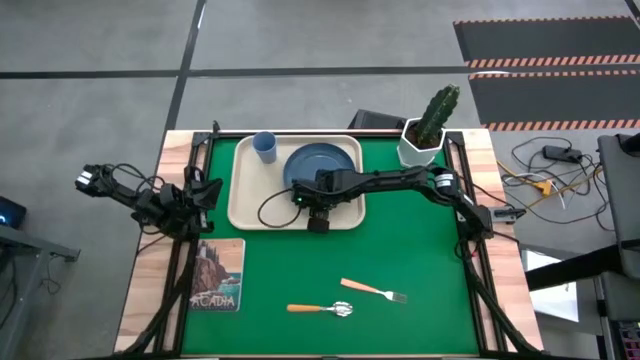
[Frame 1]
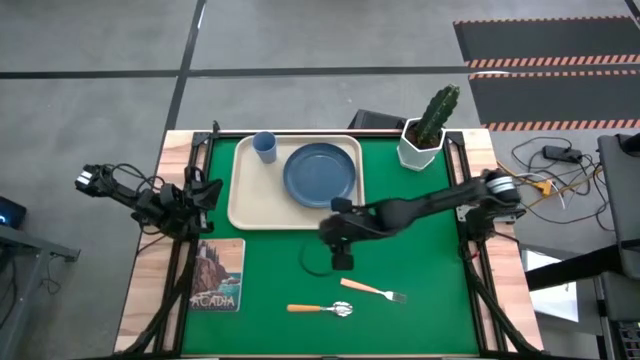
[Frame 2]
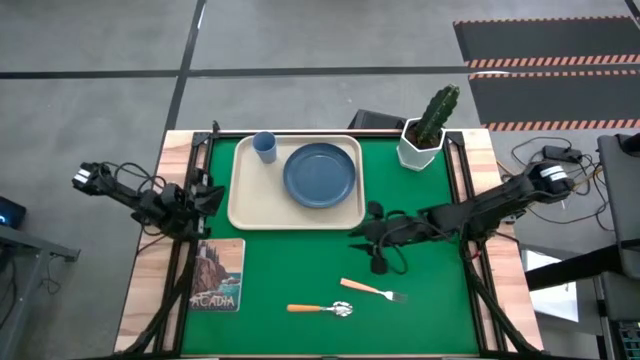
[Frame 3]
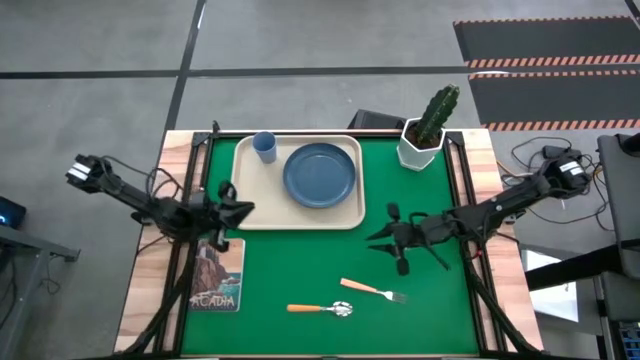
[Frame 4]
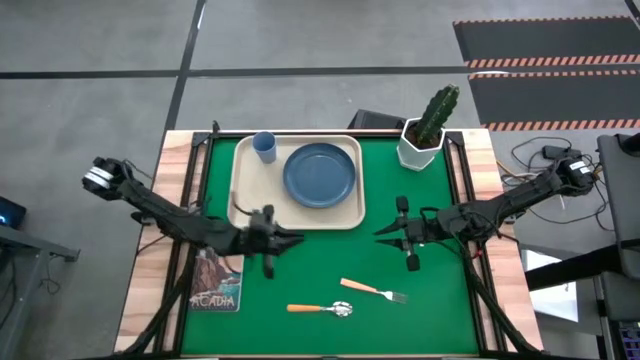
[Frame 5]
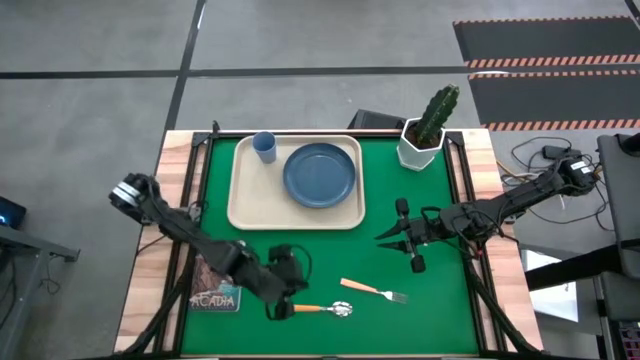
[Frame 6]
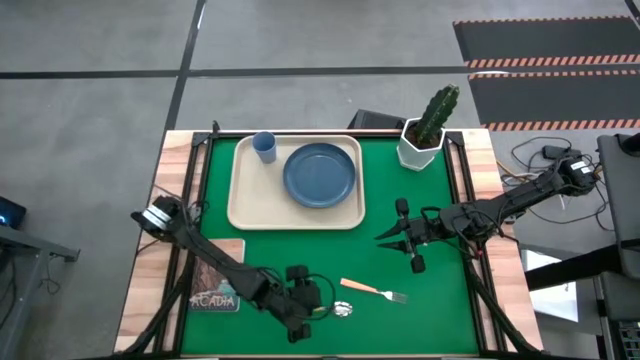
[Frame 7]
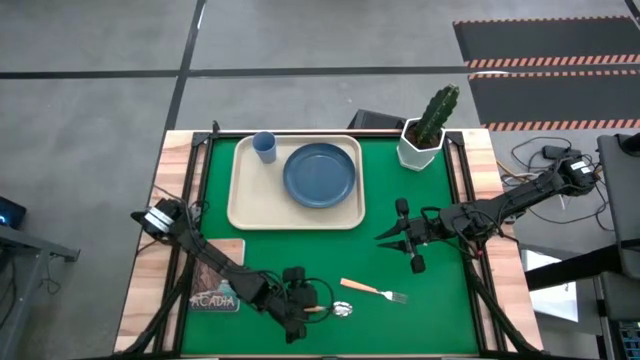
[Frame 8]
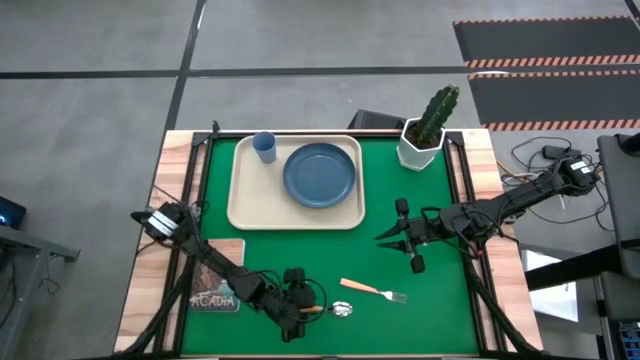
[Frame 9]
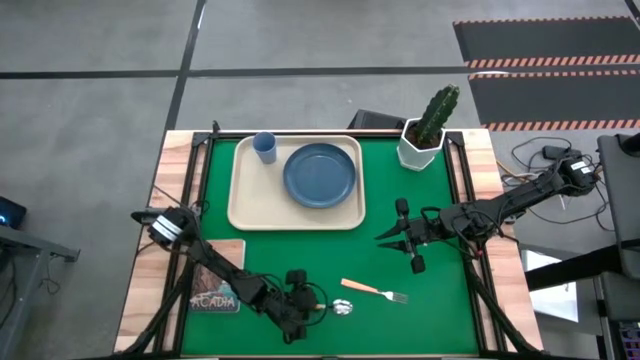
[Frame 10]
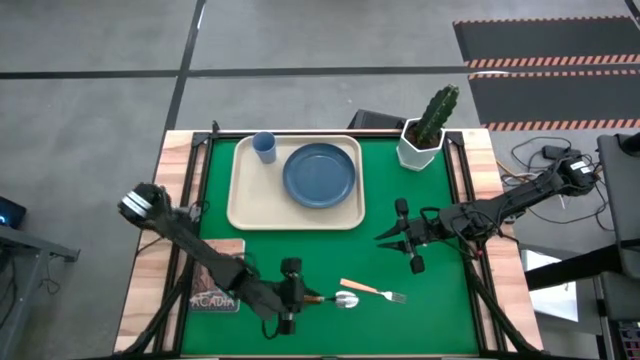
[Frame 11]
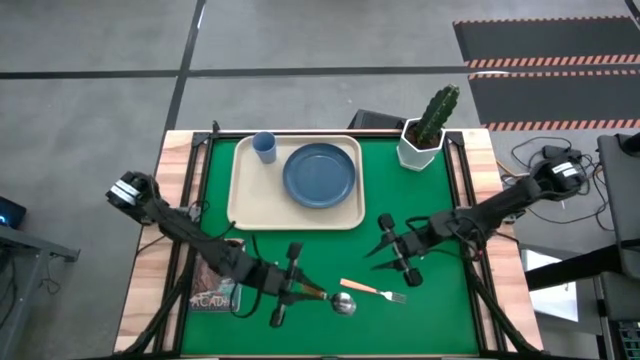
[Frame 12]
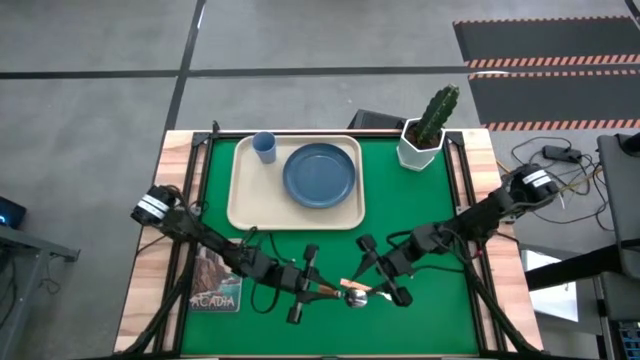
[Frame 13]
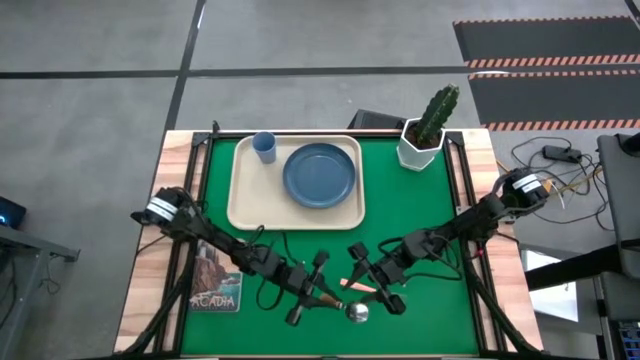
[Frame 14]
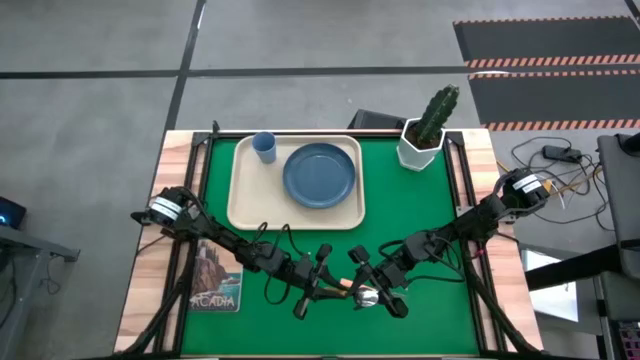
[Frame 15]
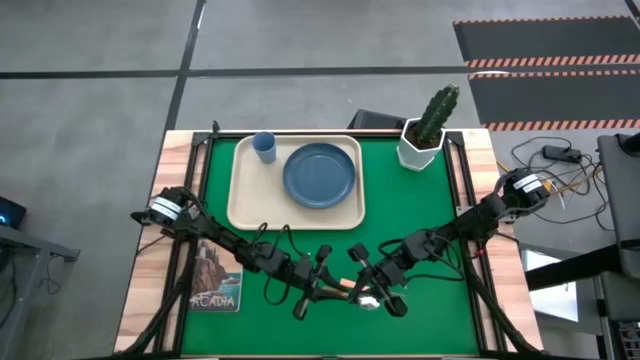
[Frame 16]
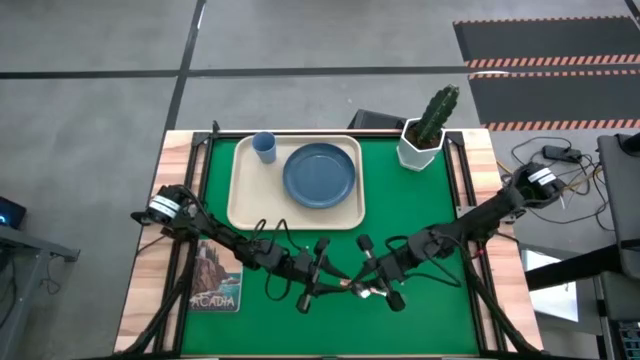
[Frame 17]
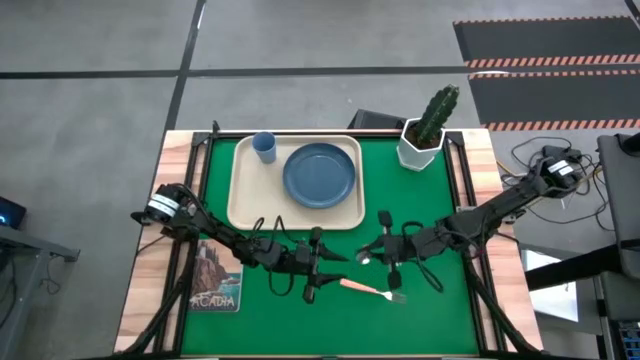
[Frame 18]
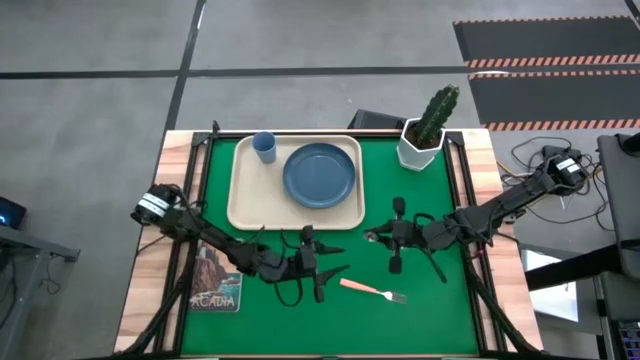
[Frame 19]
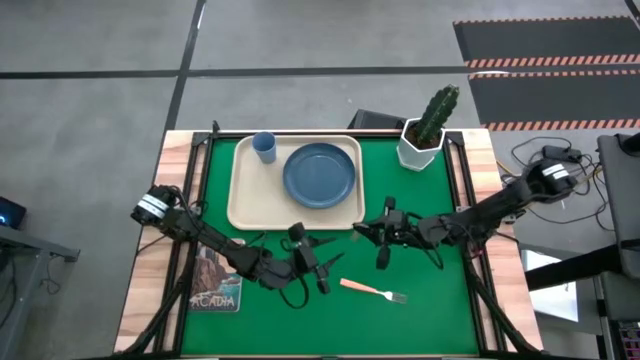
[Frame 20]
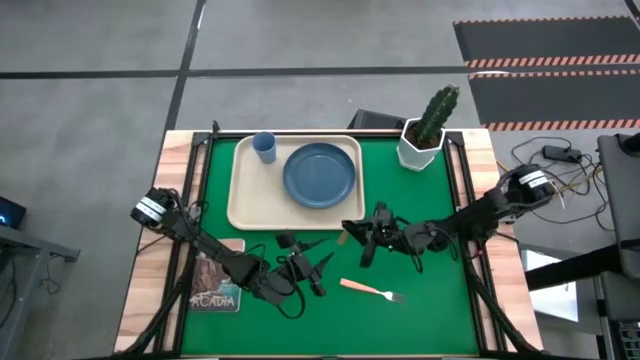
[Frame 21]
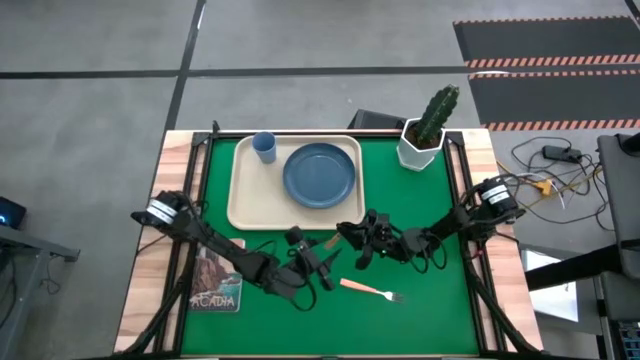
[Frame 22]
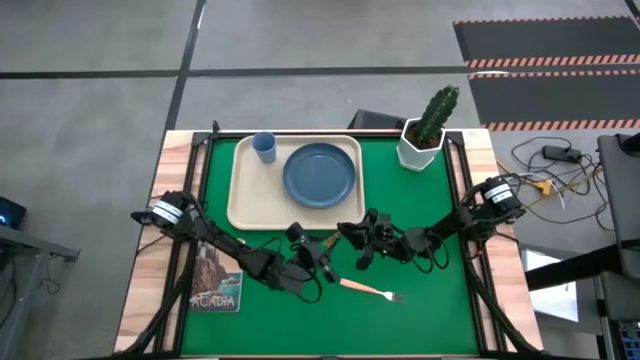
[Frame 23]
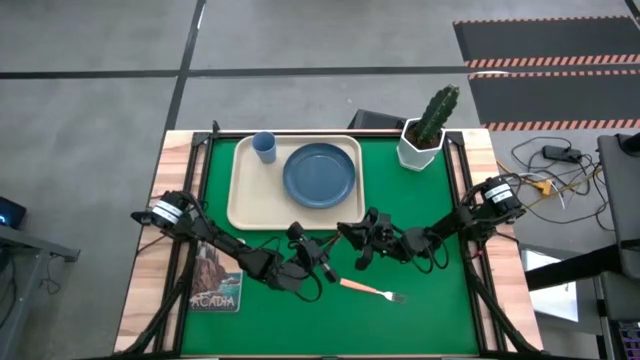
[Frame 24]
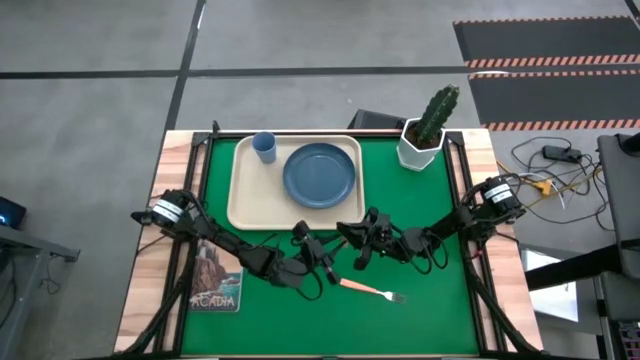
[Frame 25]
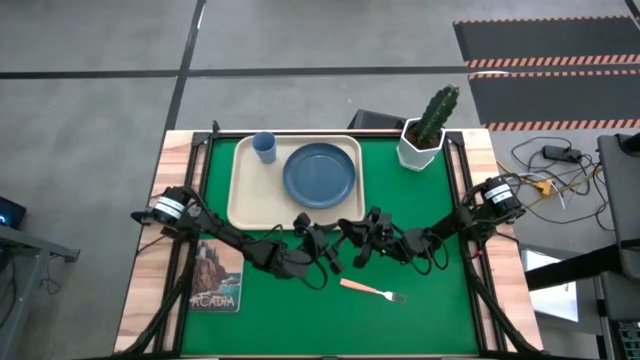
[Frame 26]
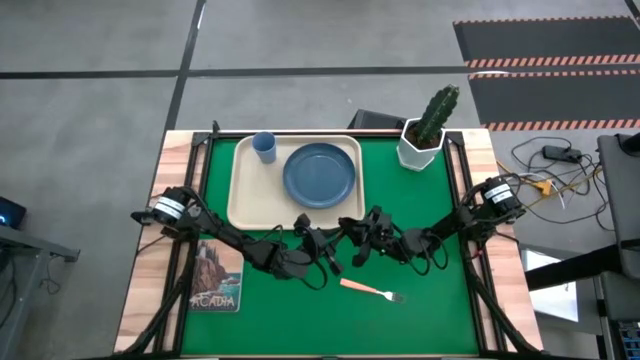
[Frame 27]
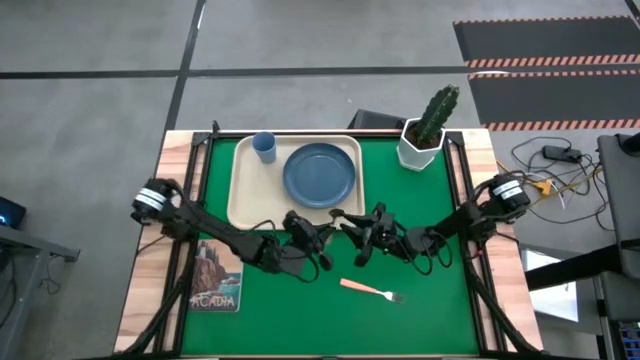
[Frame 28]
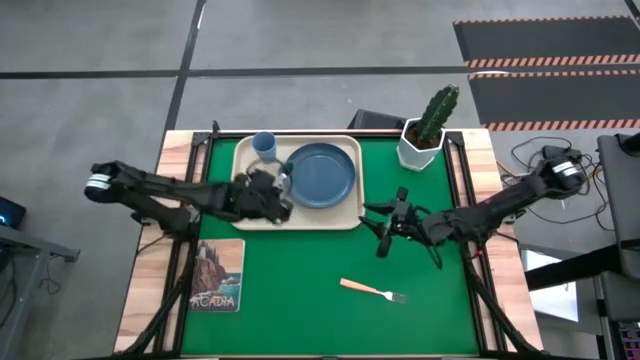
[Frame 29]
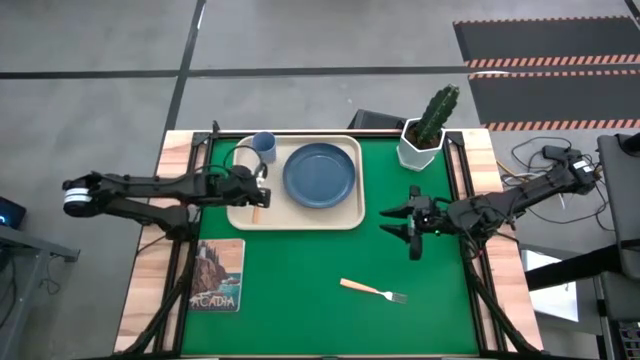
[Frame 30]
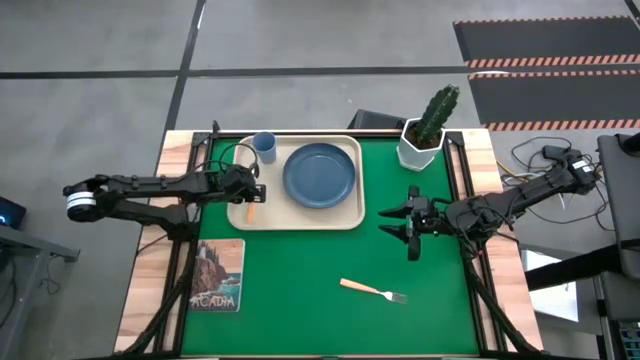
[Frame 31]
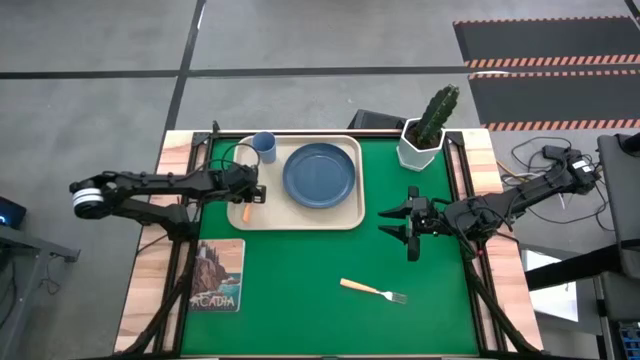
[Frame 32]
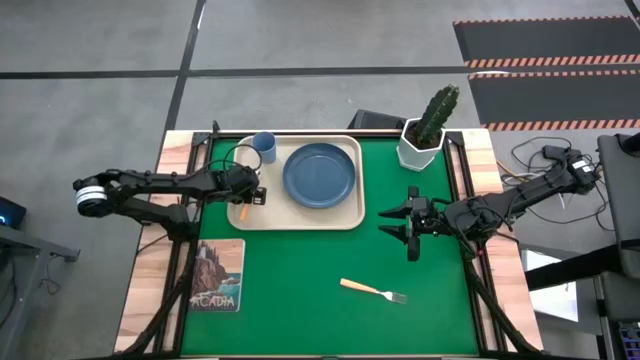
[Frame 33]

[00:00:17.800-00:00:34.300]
Task: Pick and place plate/cup/fork/spoon on tray
Put the orange spoon on the white tray to the left of the dark blue plate

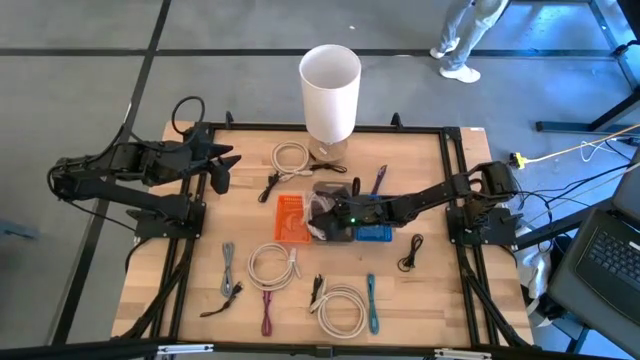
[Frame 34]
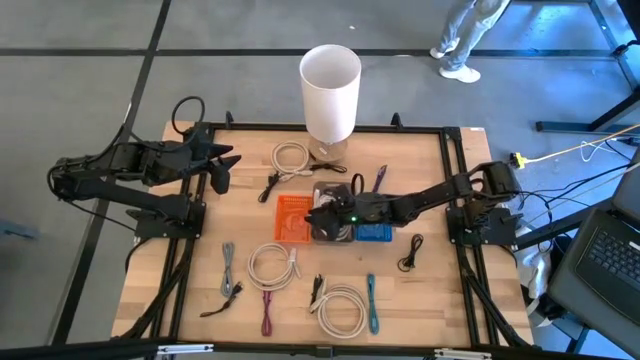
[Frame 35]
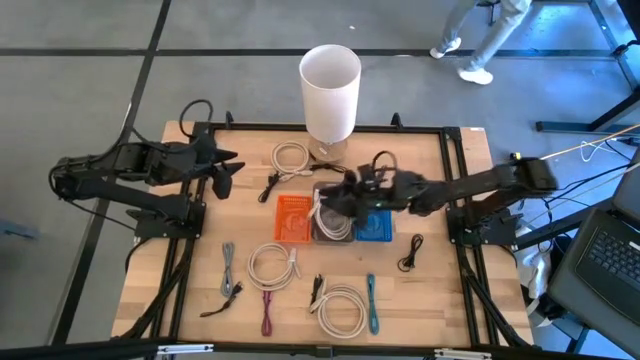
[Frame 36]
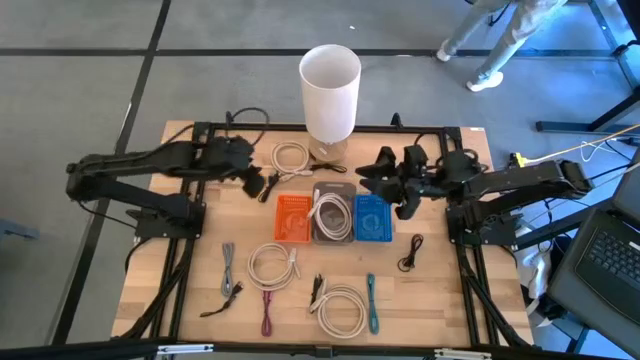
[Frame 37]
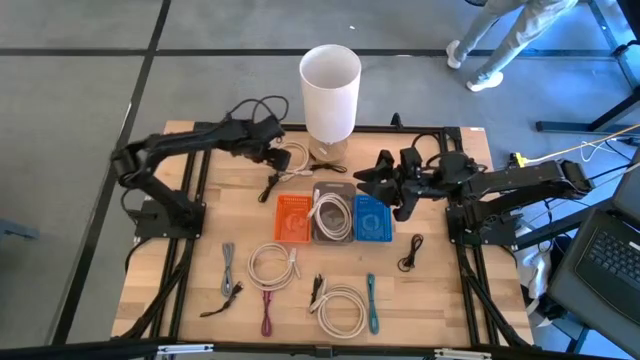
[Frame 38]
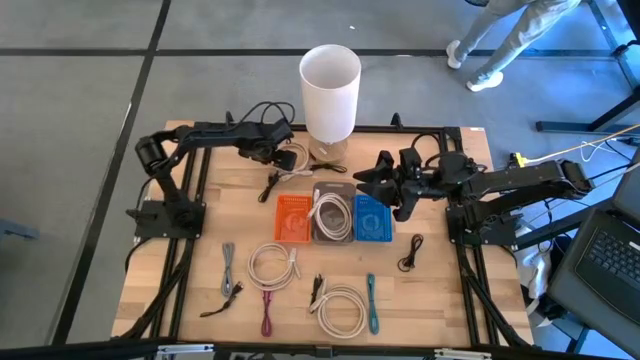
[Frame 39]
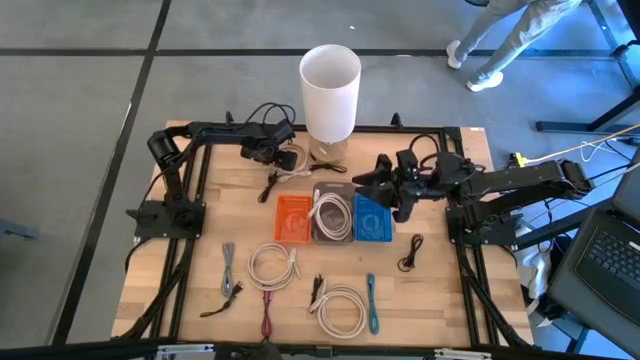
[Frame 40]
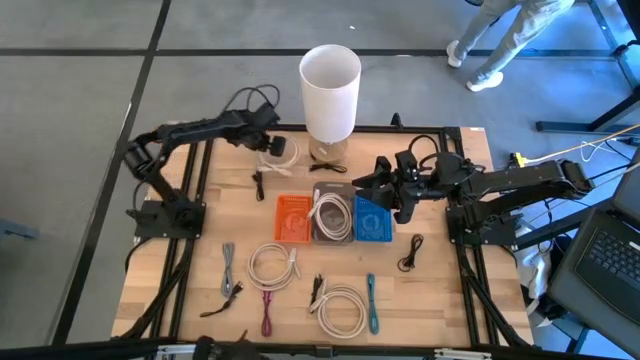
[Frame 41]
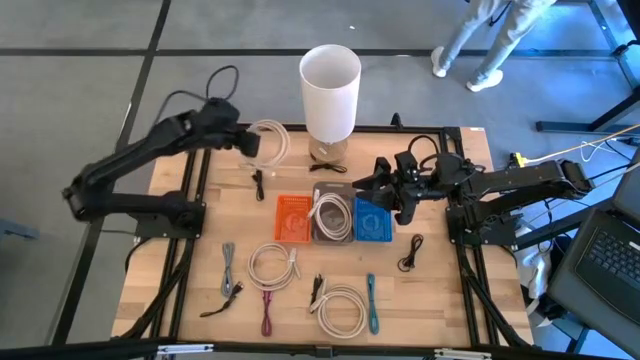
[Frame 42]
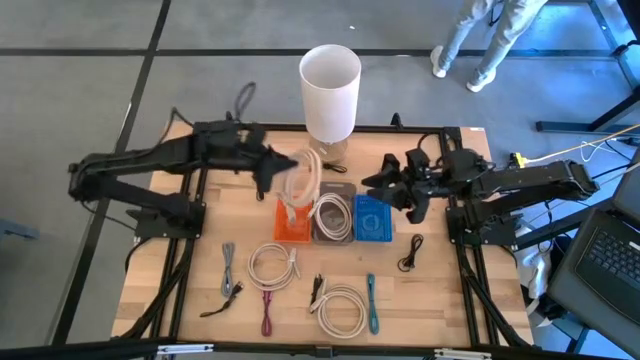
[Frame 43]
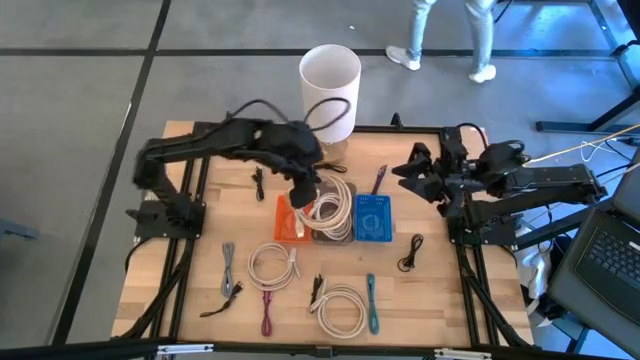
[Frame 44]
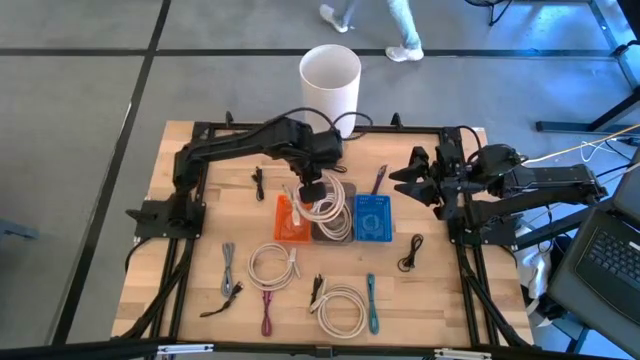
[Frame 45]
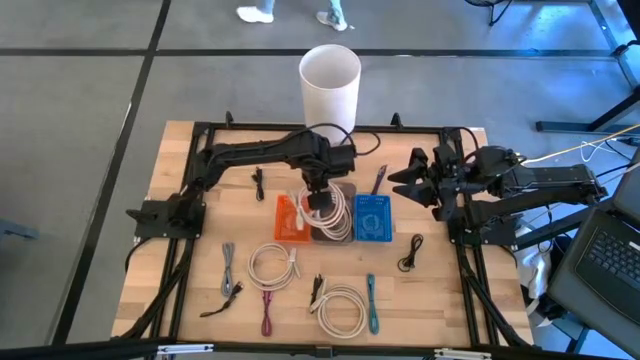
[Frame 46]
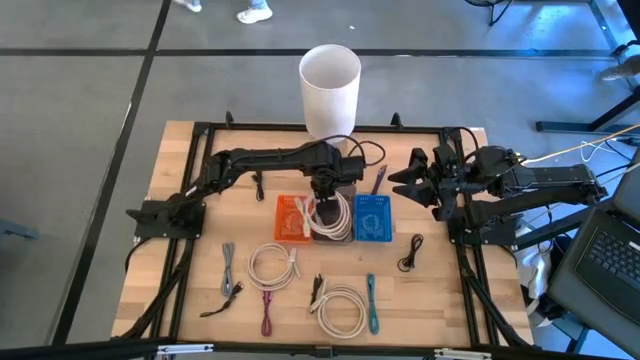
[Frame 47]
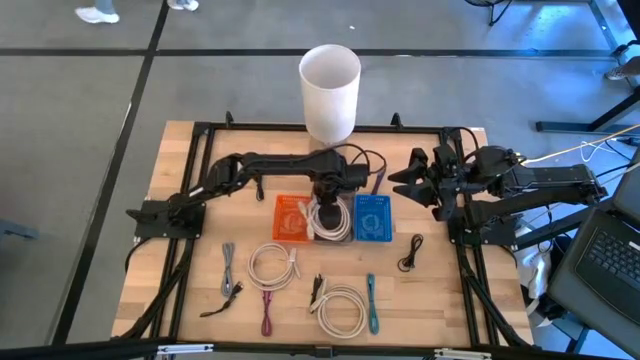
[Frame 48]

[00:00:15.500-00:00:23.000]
Task: Pick & Place USB Port
Put the brown HDMI cable into the black bin
